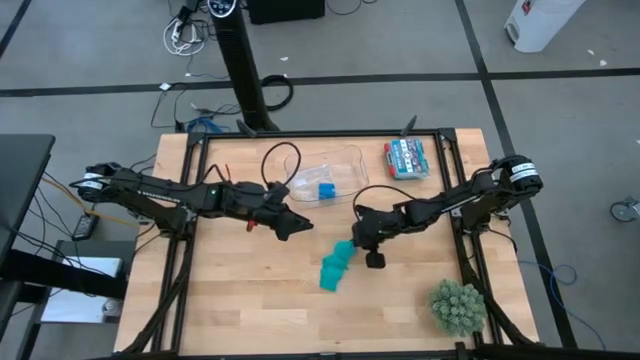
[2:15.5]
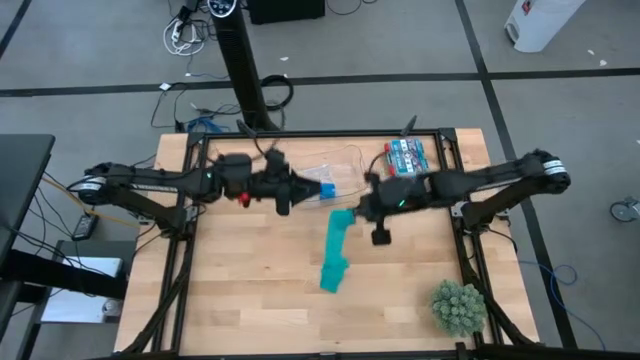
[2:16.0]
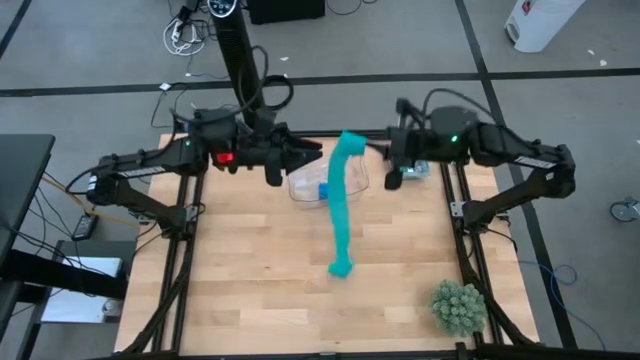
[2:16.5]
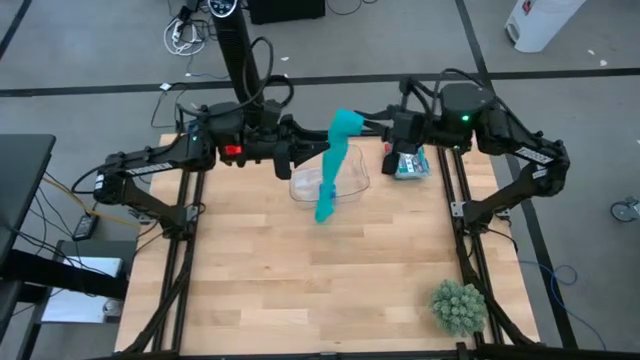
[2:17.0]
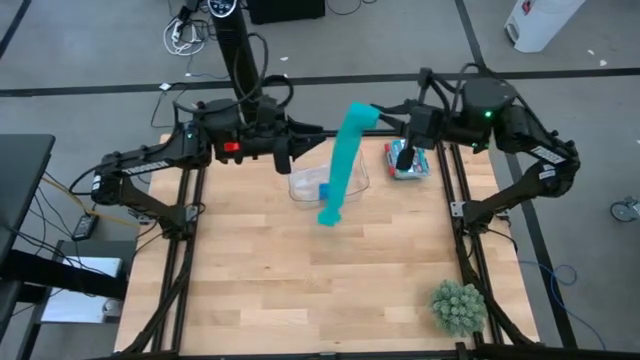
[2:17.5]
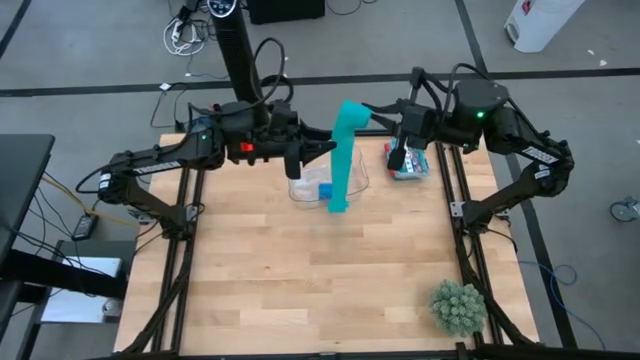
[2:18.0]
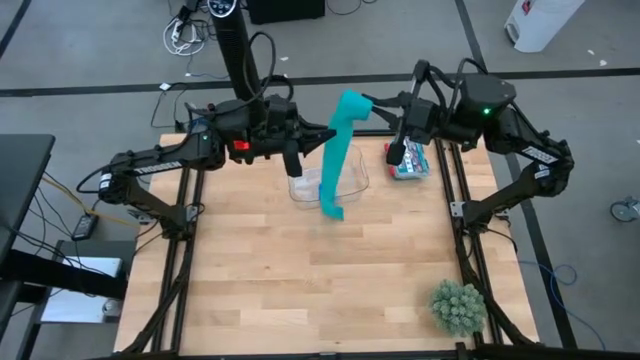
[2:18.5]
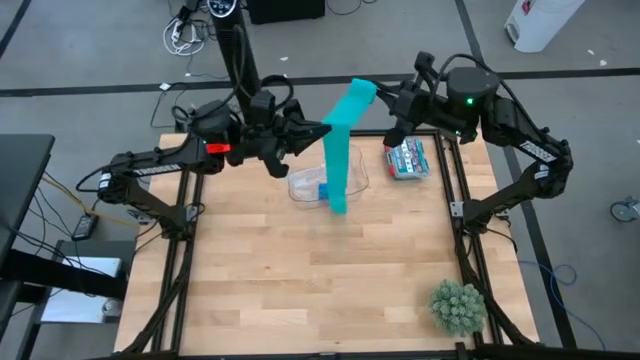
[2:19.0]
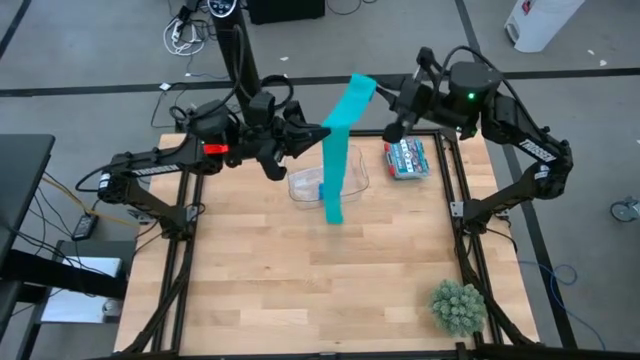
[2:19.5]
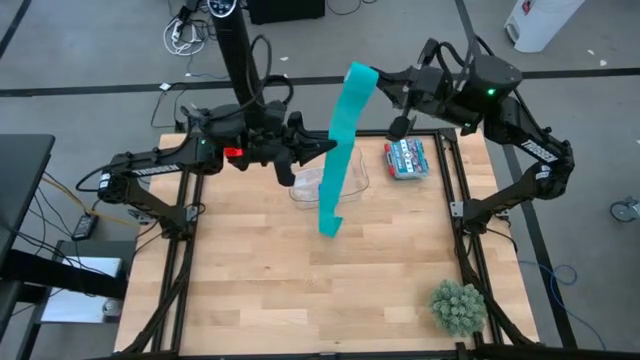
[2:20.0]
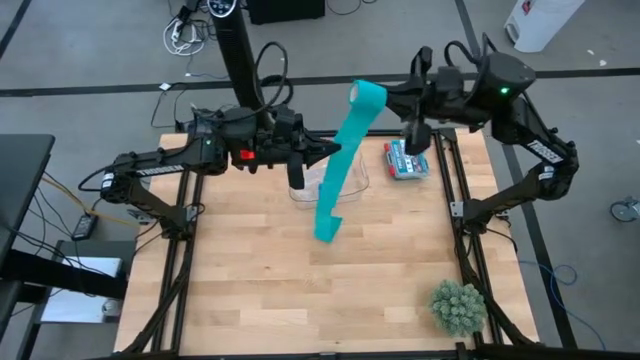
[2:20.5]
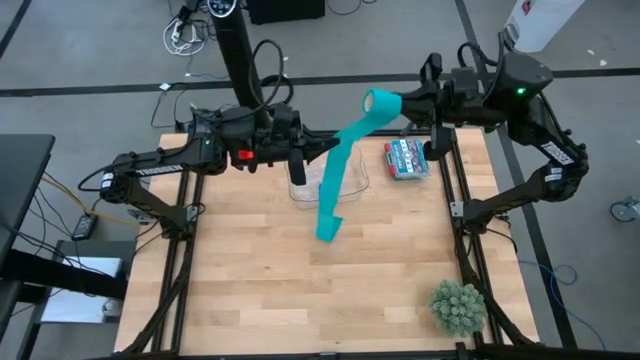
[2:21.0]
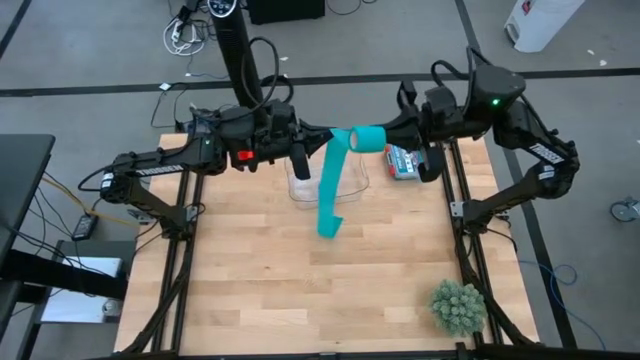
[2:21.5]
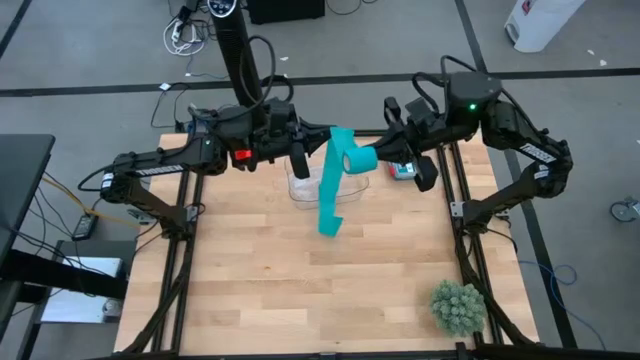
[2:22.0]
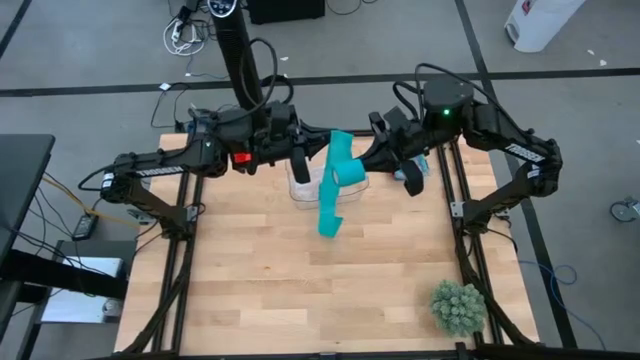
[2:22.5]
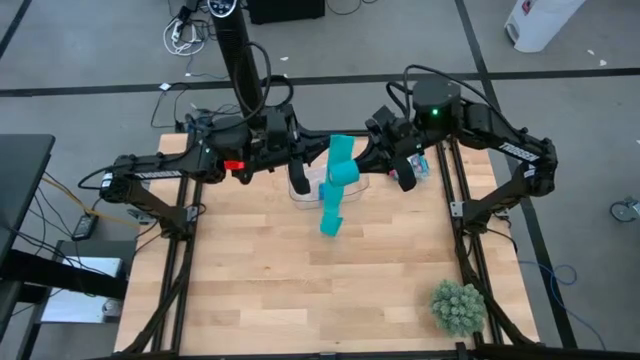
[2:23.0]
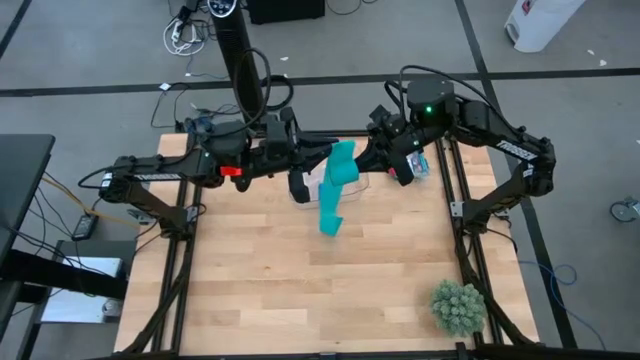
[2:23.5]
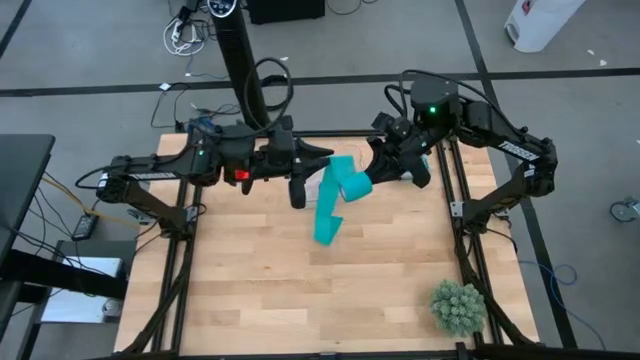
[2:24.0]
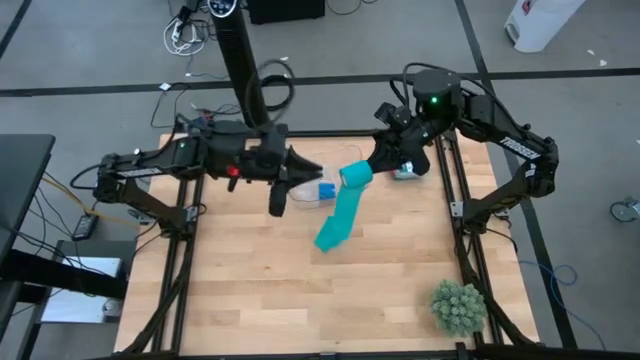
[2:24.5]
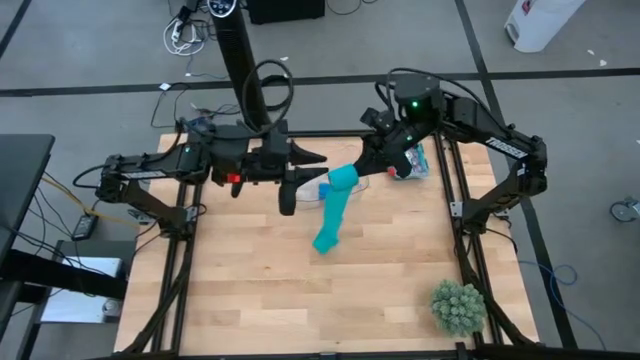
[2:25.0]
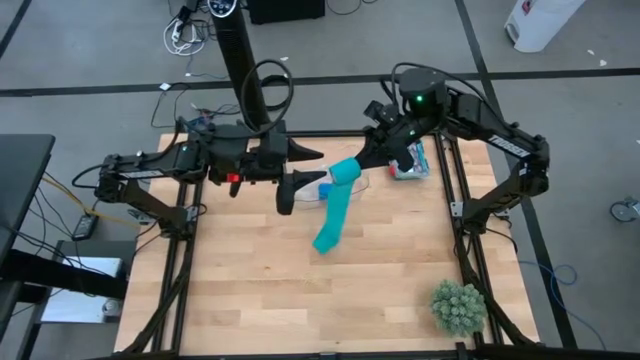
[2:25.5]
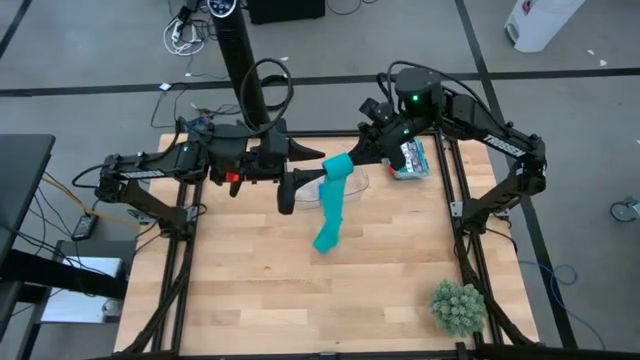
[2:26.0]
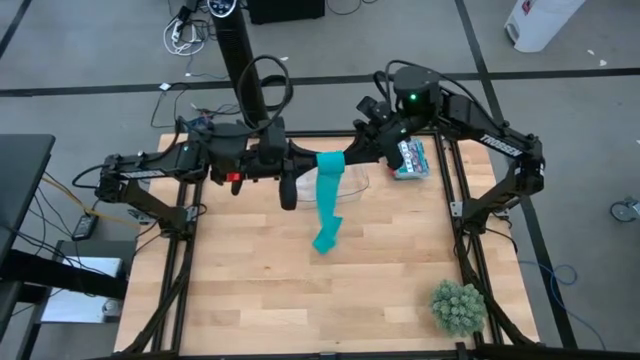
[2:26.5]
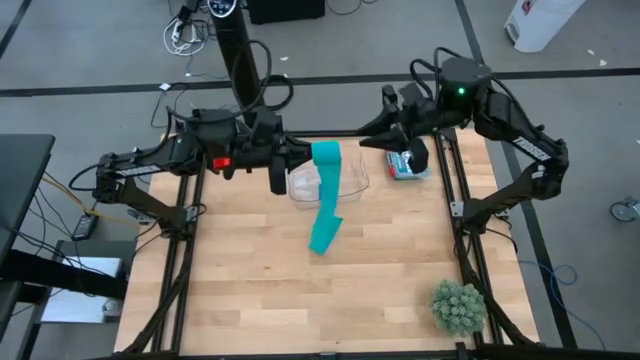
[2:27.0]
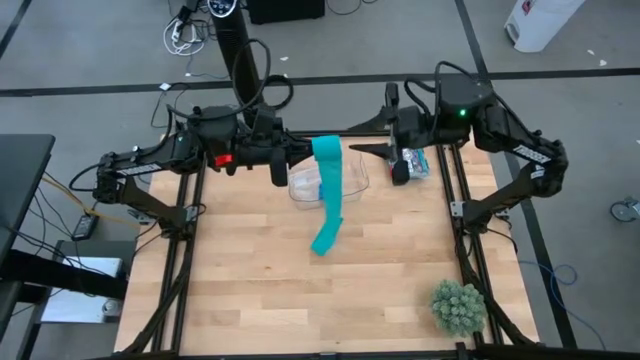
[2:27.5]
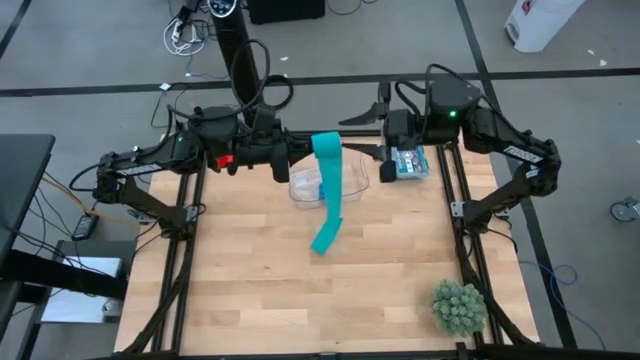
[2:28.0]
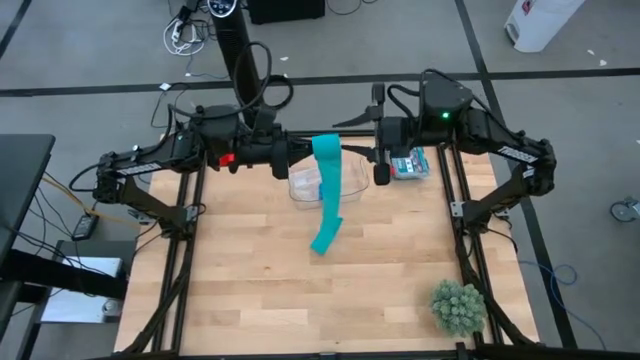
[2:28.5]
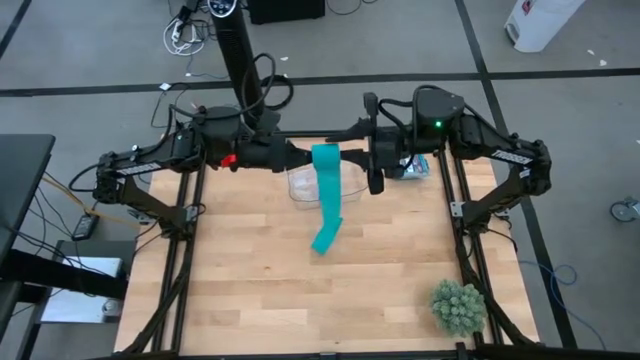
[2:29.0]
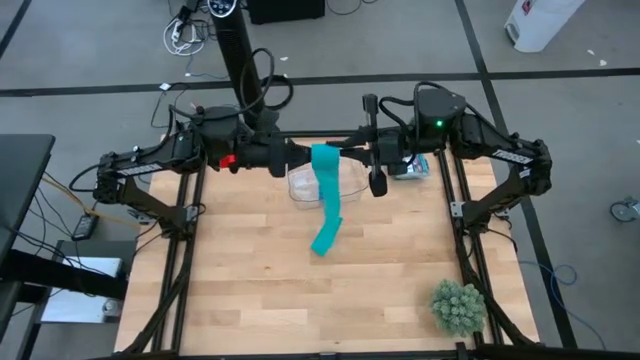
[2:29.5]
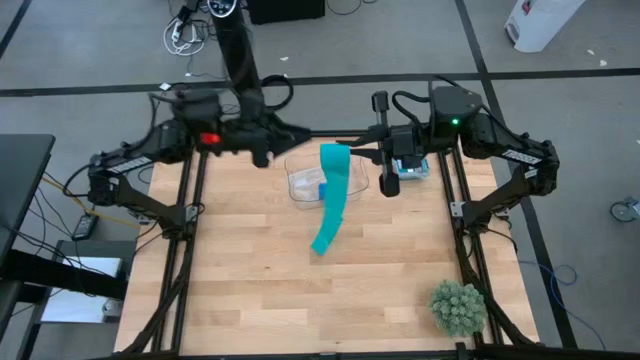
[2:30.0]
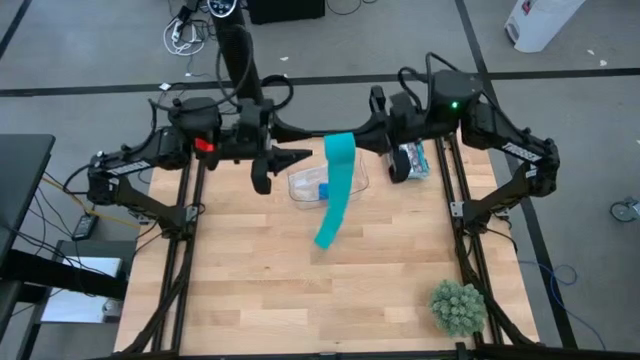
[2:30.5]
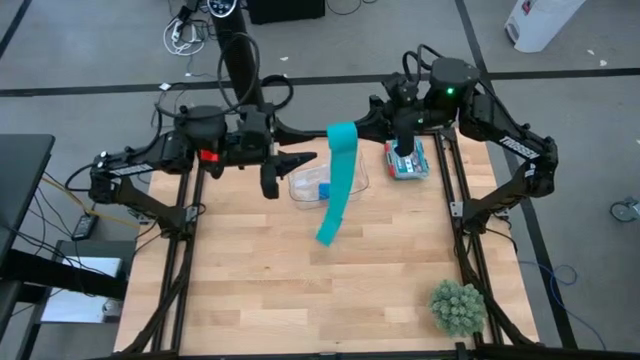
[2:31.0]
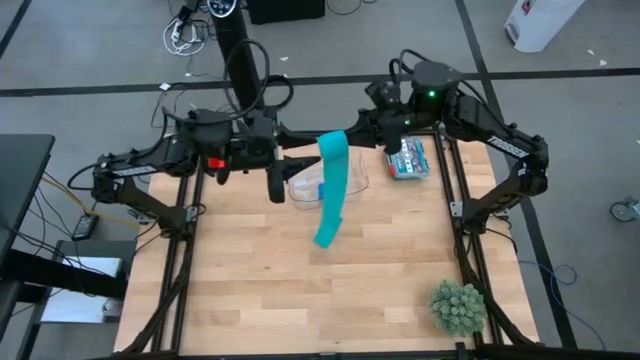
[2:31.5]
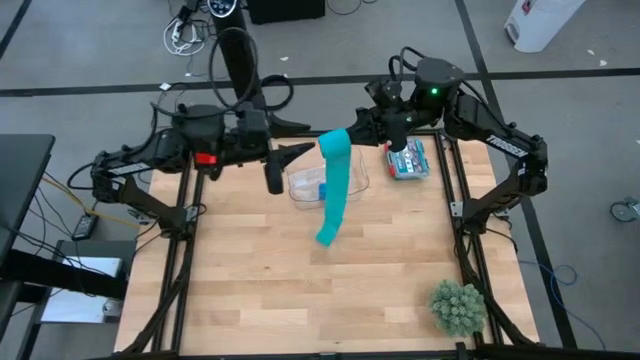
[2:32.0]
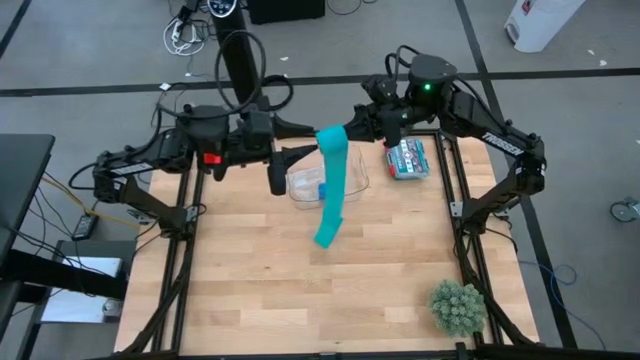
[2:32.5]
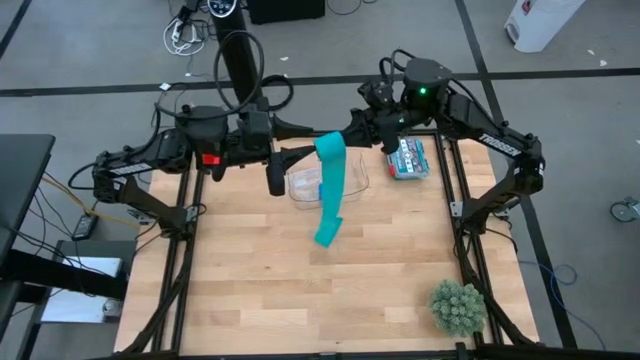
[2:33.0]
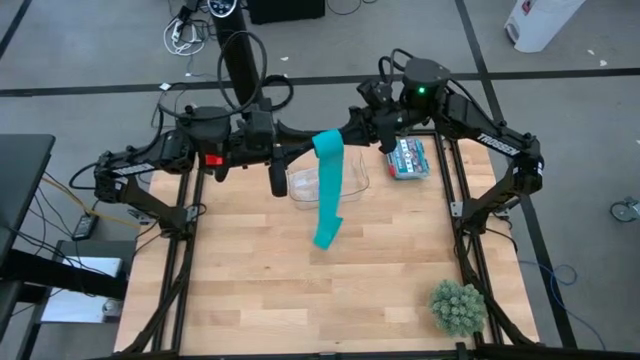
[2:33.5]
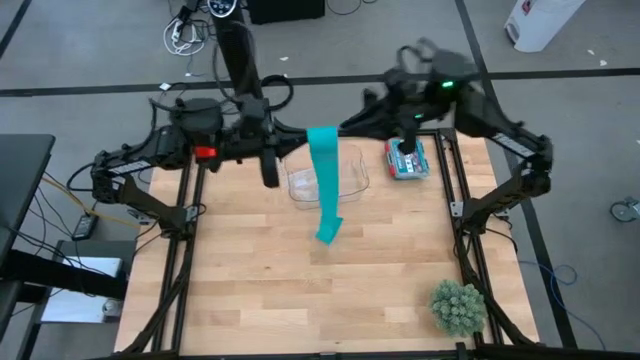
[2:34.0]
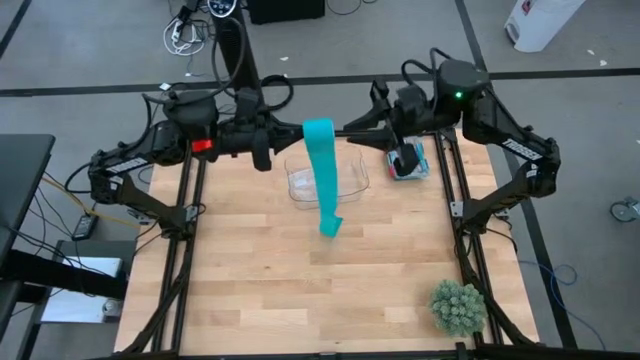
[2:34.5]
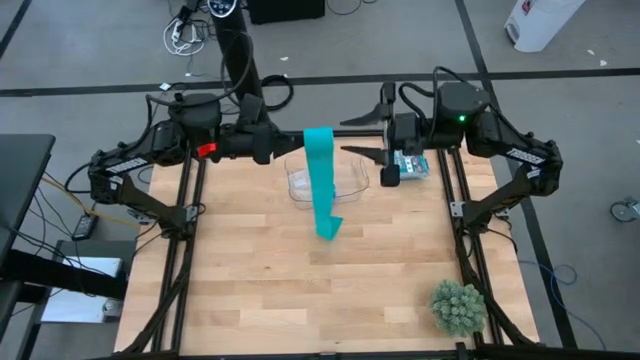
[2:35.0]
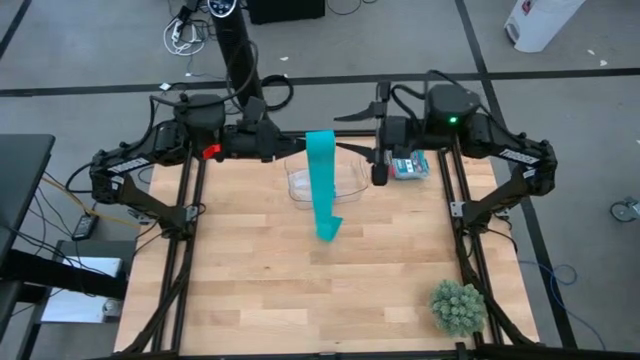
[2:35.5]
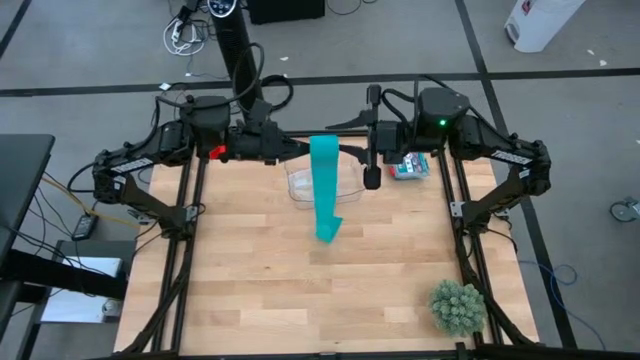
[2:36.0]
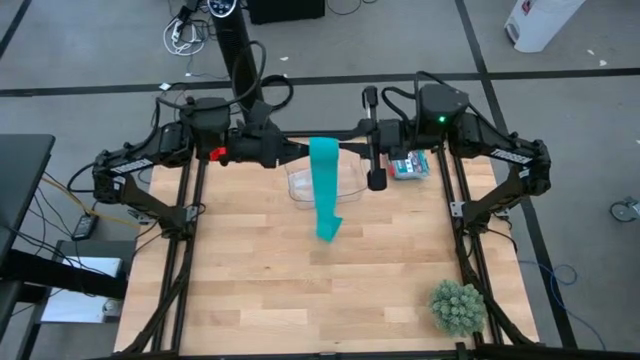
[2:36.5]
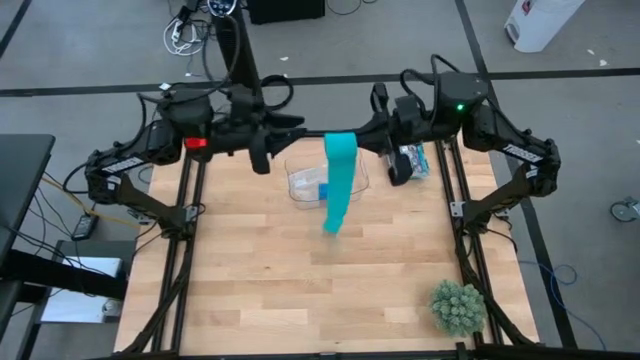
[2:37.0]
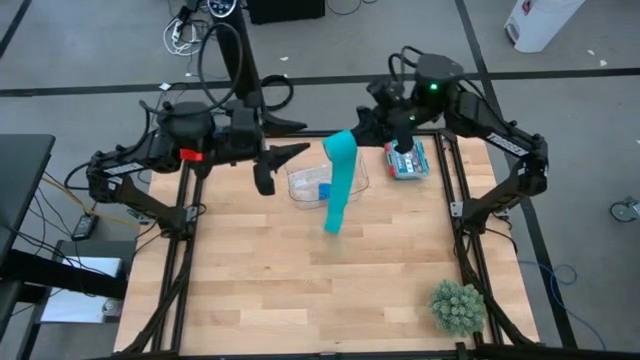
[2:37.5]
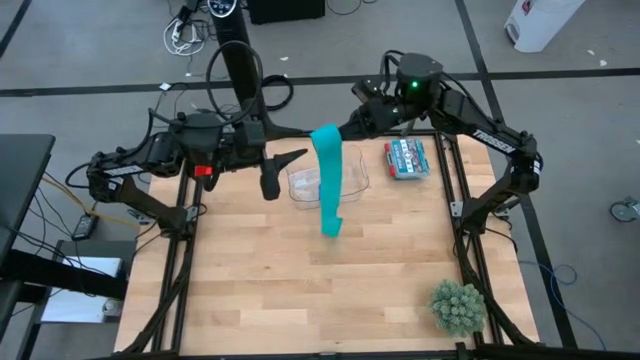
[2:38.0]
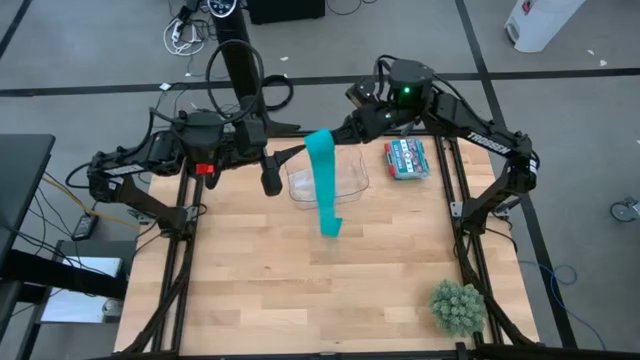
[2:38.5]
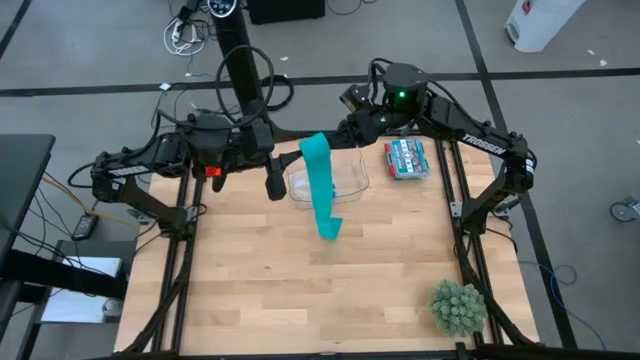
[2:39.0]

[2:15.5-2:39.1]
Task: Roll bandage
Roll the sky blue bandage
